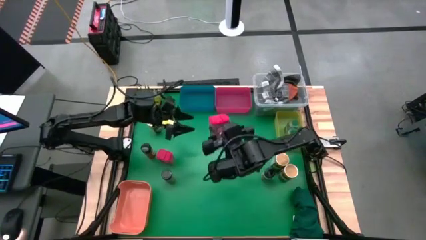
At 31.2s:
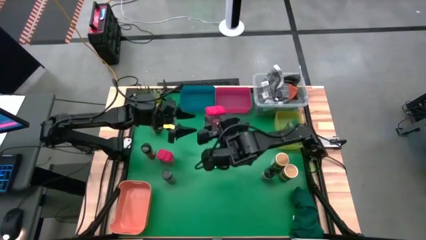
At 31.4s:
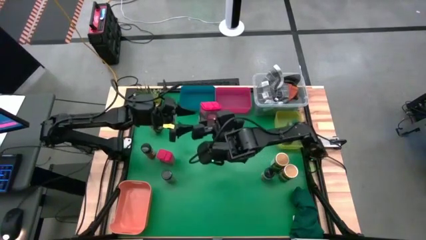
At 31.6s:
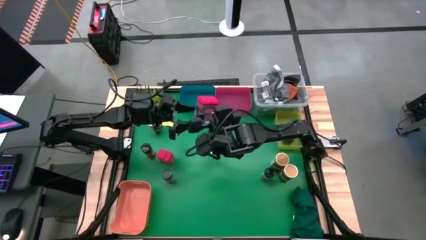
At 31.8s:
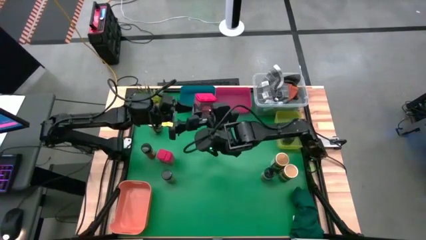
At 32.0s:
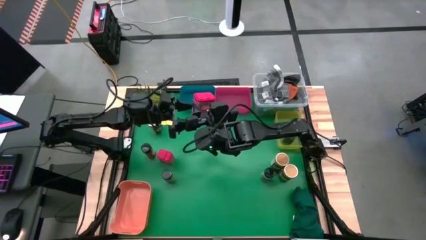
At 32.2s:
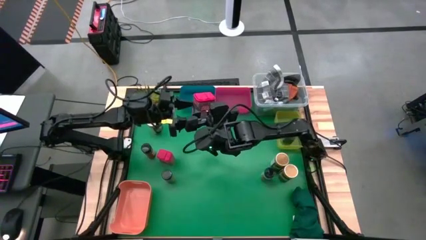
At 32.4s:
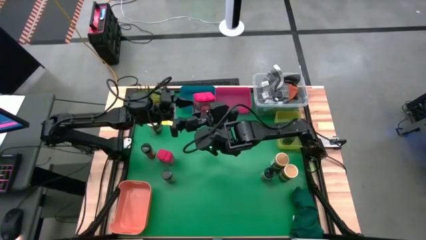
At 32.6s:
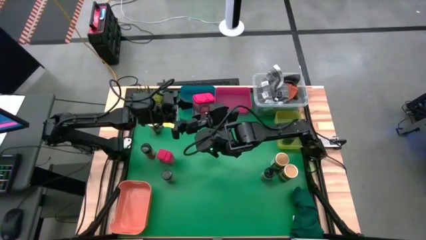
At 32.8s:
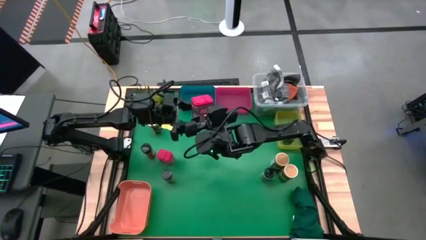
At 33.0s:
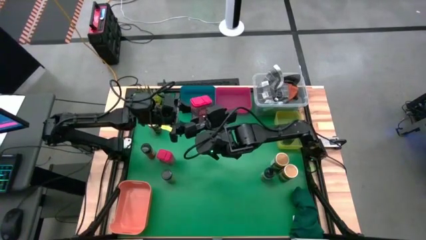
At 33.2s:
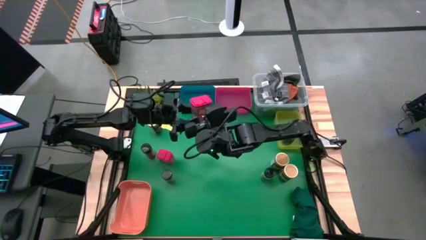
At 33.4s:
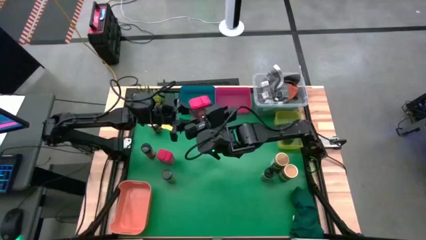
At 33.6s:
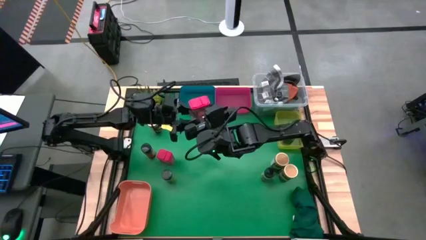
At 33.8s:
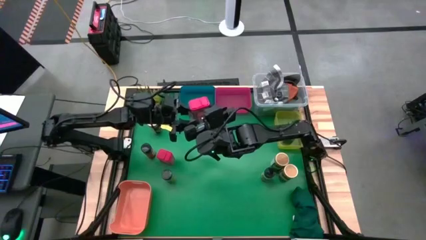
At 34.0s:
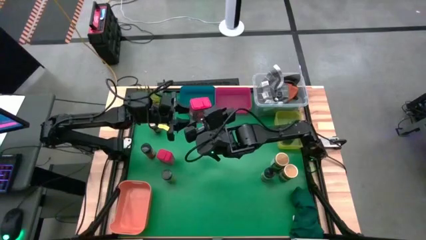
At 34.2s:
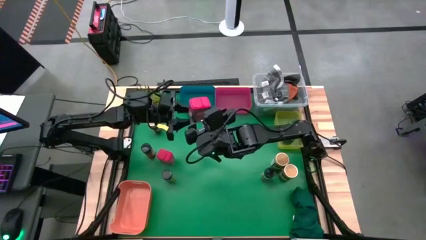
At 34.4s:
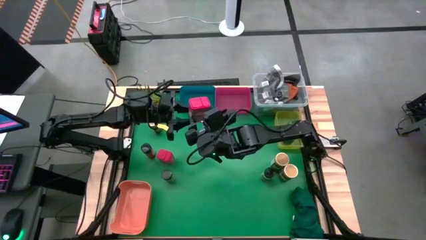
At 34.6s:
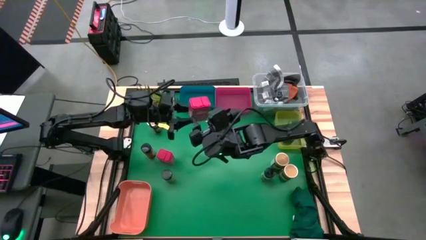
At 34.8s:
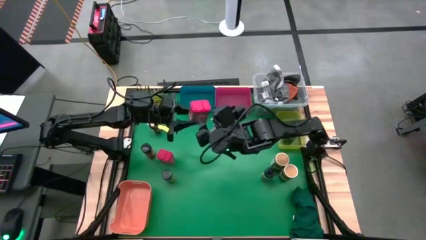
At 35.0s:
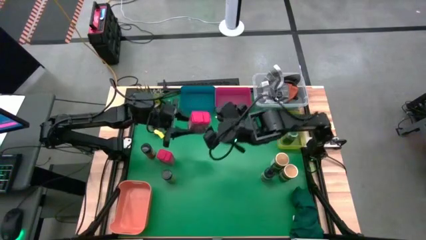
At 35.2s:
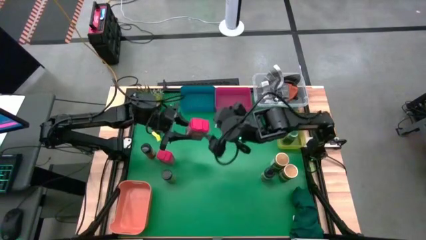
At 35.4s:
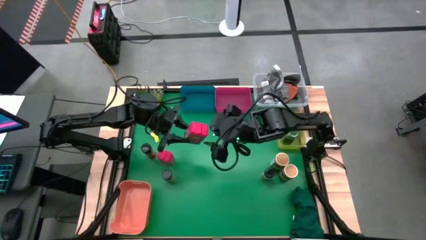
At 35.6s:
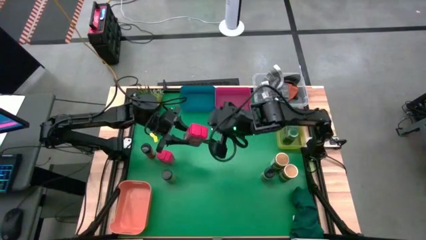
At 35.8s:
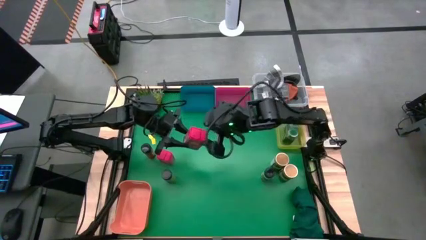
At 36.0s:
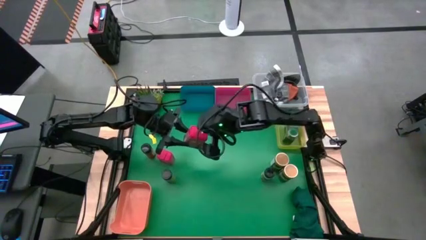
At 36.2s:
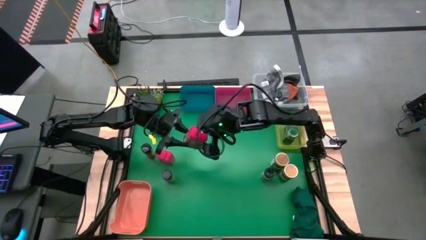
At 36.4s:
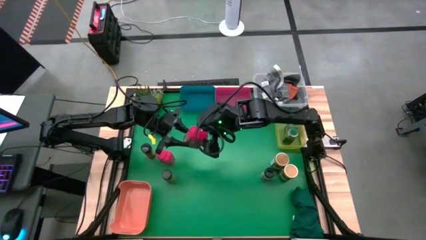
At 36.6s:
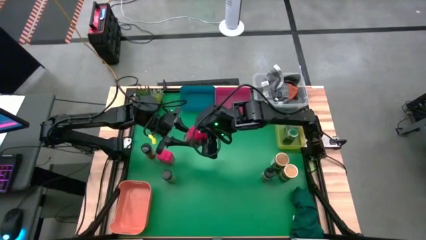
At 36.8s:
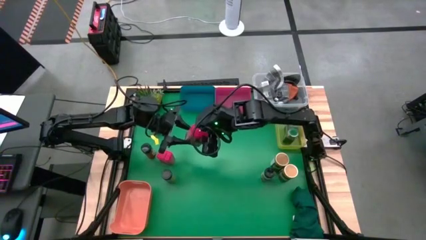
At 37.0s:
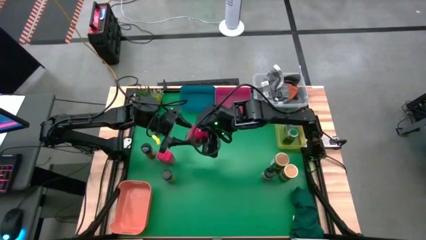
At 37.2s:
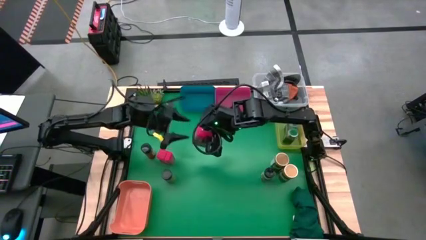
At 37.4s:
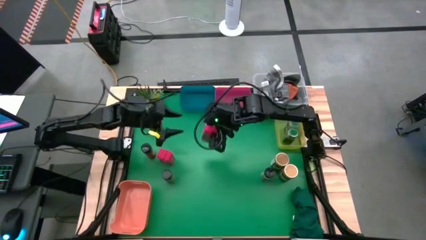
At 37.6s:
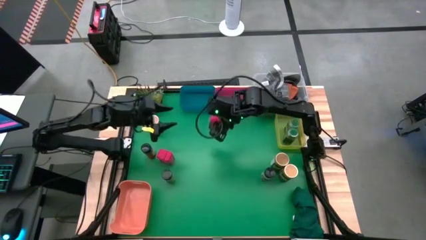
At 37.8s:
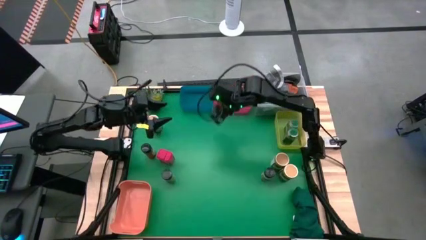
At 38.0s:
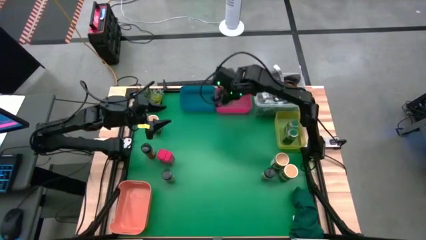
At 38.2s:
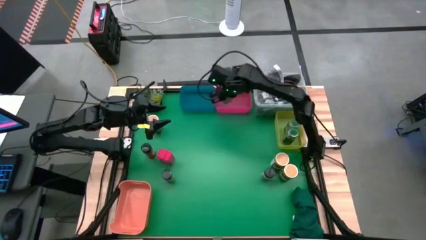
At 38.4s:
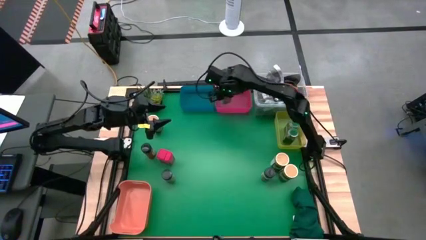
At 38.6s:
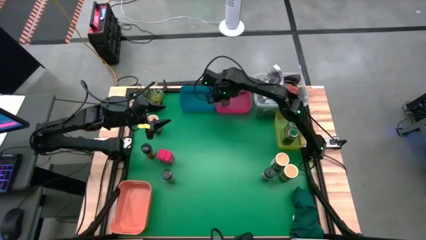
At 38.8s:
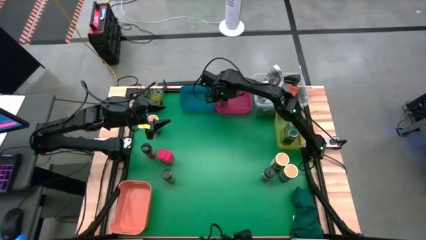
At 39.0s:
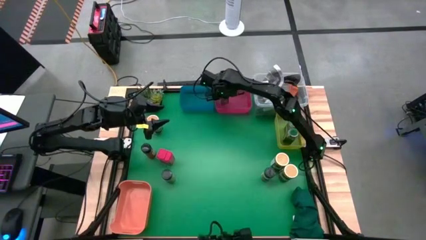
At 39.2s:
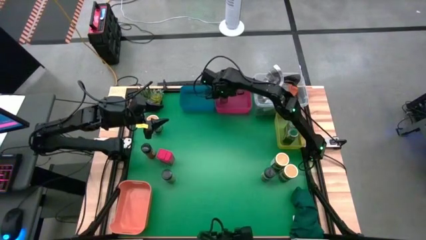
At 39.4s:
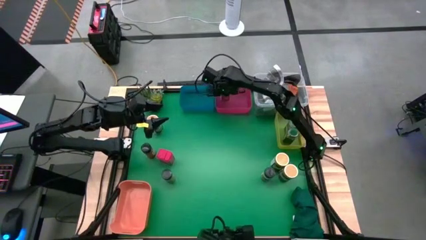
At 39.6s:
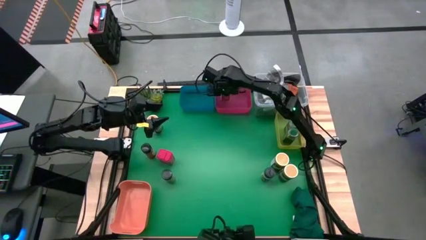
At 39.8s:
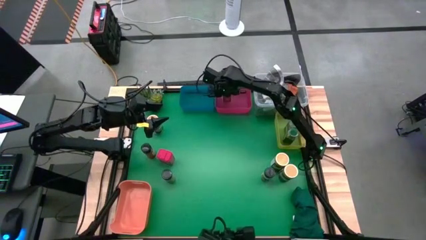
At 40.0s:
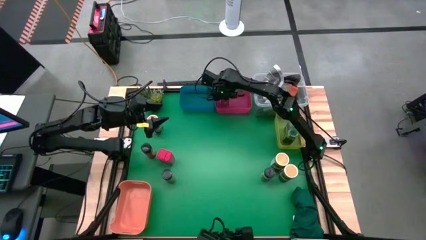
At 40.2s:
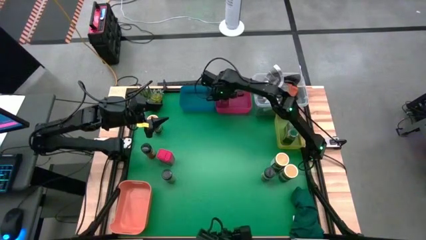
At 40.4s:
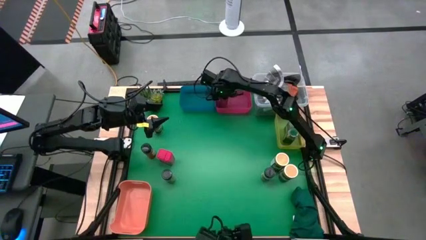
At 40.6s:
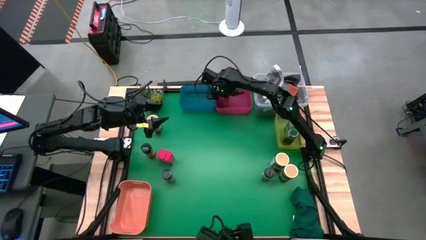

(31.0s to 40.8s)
Task: Sort spices by type
Put the right red spice can into the red bin

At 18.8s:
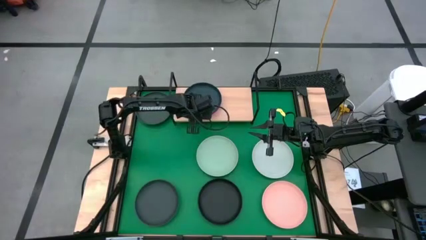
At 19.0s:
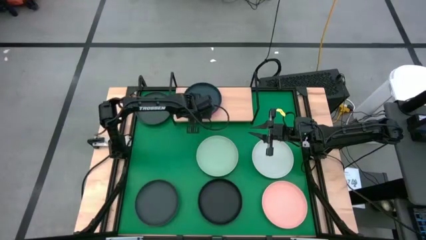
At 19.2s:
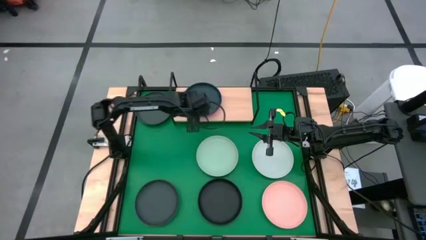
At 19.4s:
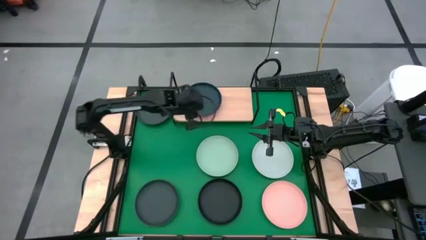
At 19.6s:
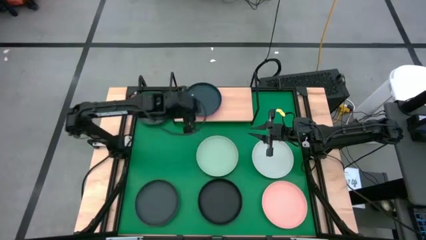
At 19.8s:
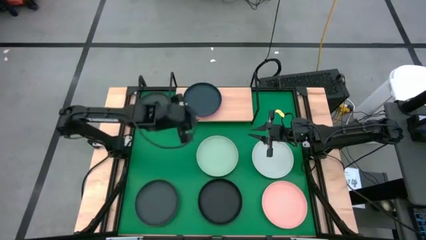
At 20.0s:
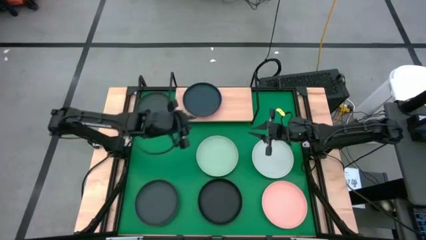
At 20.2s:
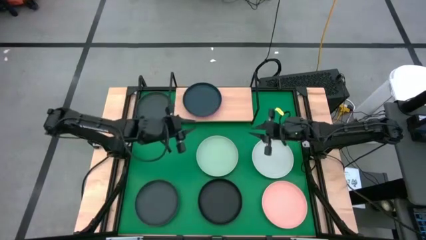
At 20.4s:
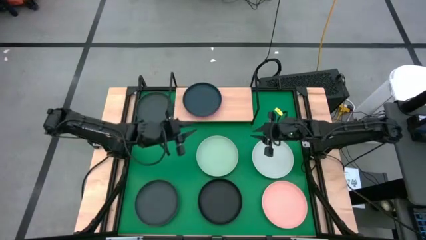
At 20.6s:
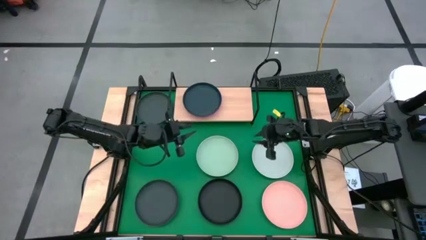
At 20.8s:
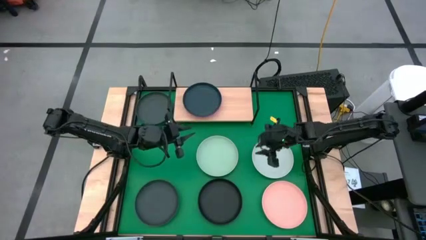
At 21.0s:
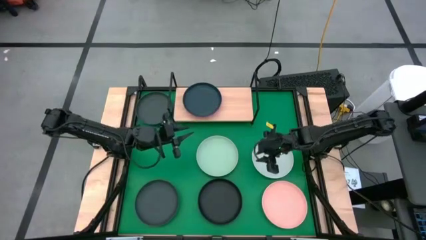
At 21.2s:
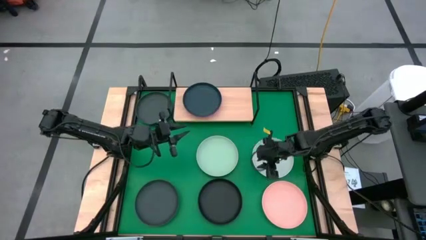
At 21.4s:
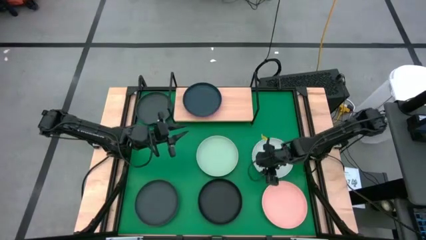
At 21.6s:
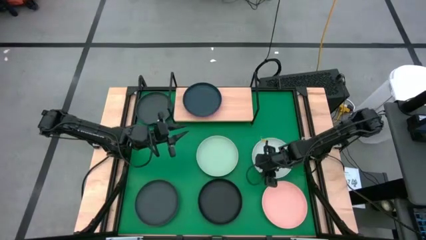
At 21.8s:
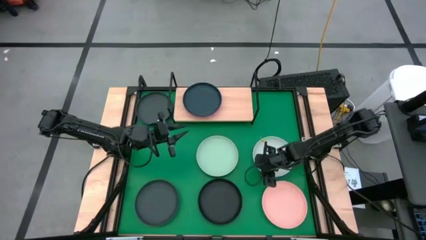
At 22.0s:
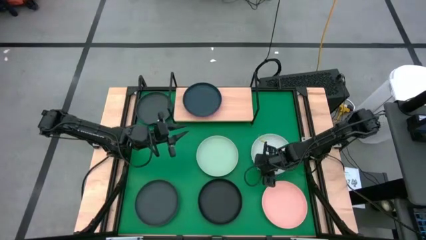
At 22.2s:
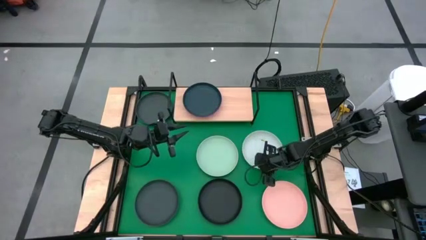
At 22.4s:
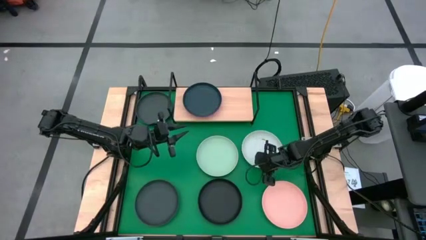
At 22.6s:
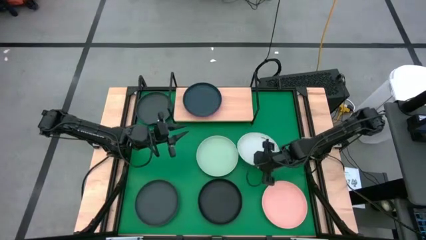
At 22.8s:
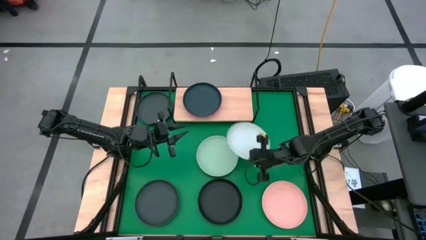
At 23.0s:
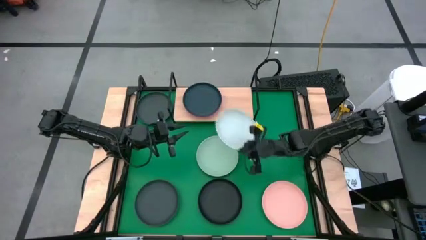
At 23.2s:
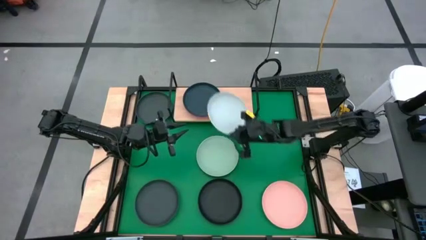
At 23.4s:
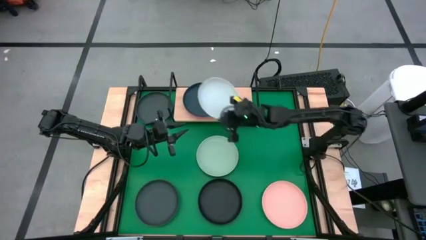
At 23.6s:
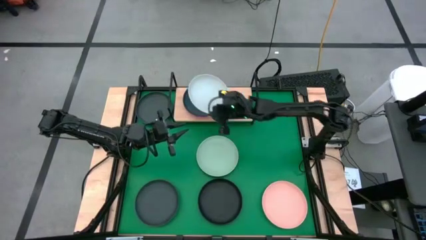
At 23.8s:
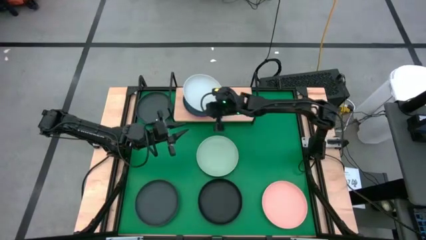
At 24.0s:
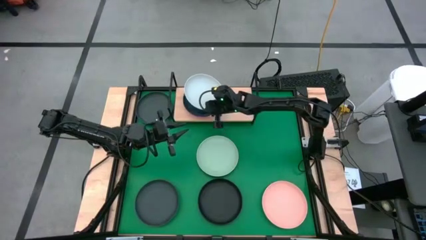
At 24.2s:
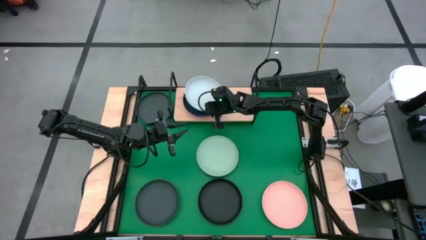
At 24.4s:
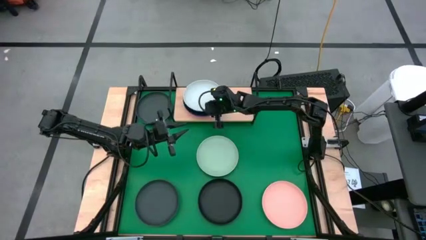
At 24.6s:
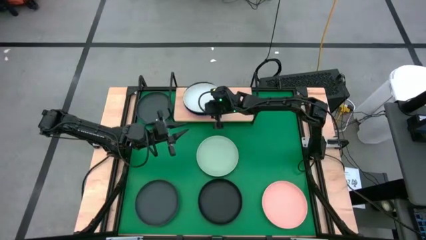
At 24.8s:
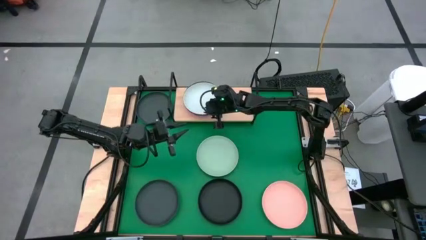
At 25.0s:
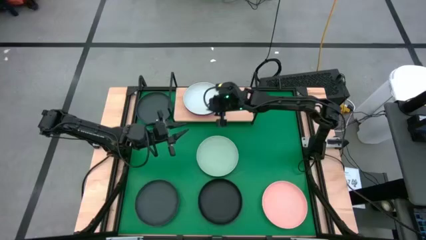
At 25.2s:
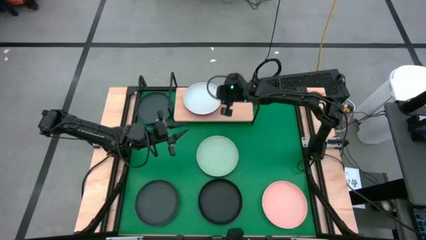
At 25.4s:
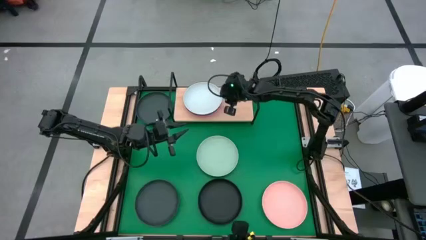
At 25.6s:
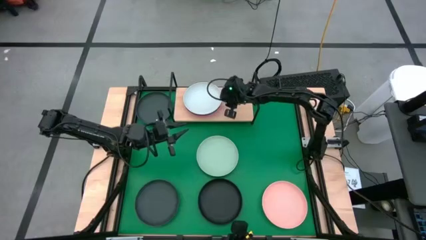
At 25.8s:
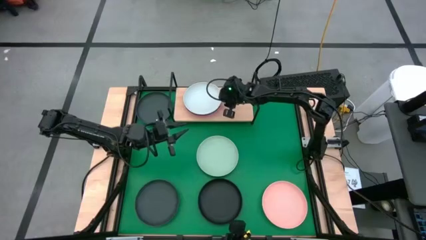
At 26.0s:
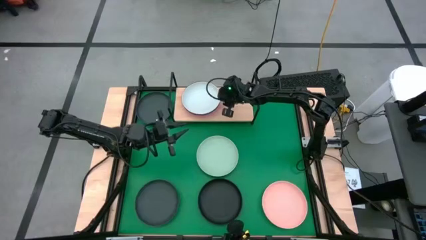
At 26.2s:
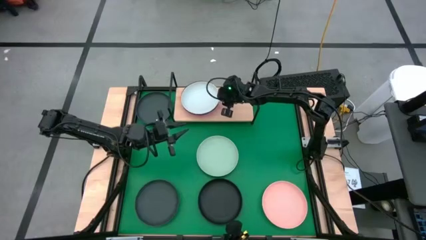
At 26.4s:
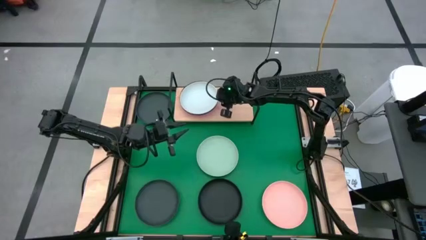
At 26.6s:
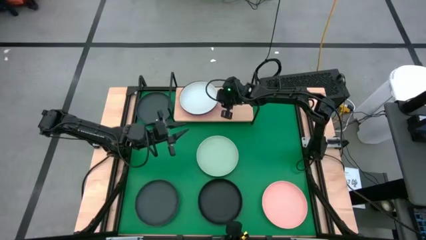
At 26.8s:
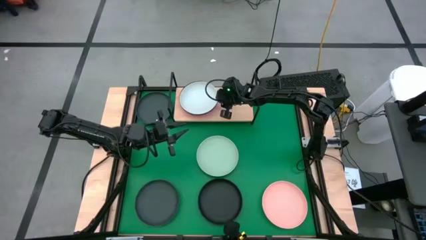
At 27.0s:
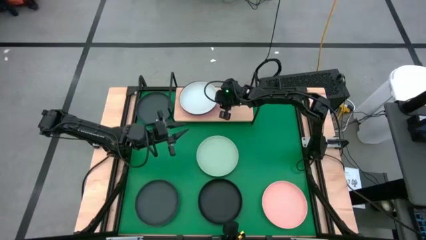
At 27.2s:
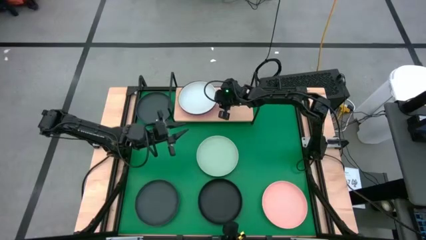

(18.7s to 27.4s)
Task: Place and stack plates onto a shelf
Stack the white plate on top of the dark blue plate on the shelf
